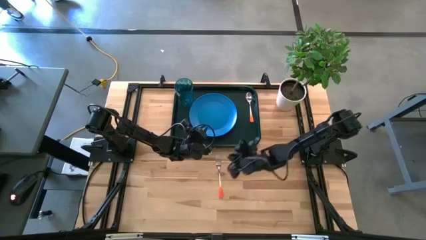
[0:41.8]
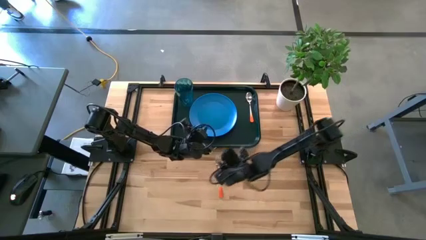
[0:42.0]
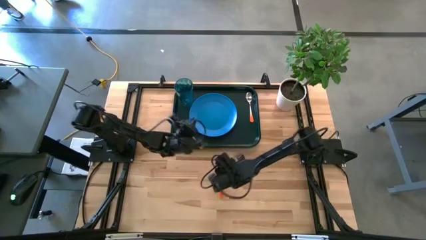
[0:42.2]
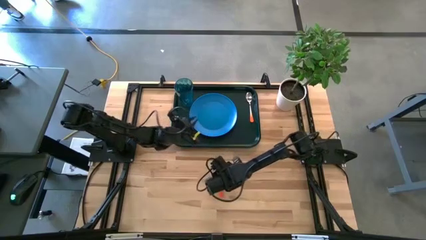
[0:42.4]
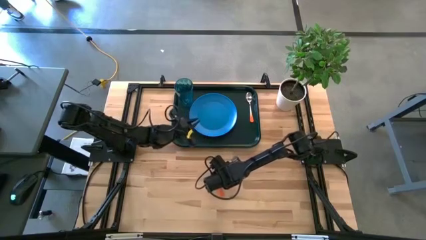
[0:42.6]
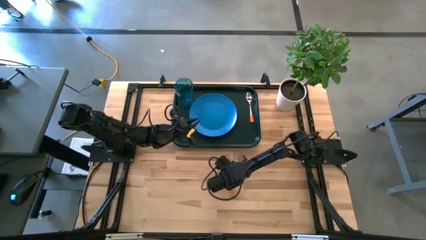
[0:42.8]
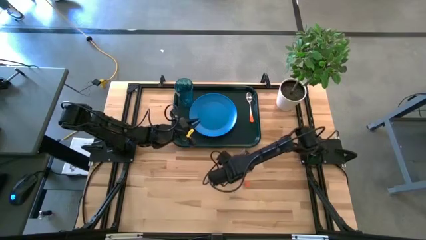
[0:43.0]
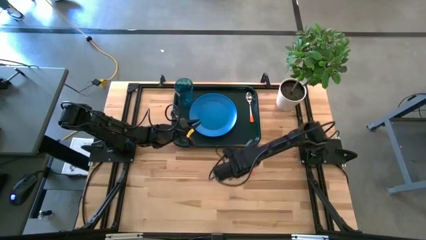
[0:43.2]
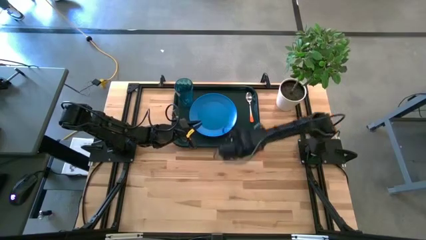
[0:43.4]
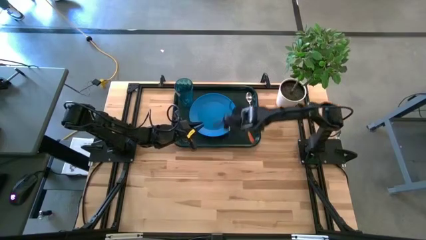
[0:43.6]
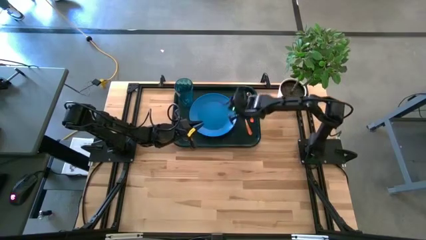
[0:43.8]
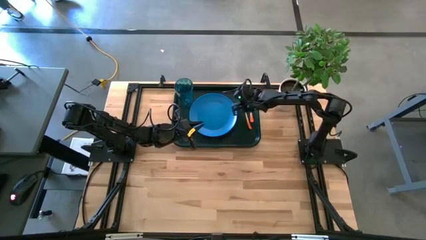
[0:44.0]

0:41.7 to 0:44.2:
Task: Pick and place plate/cup/fork/spoon on tray
Put the orange fork on the green tray

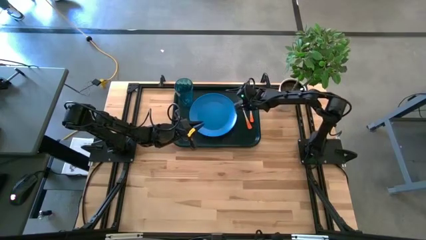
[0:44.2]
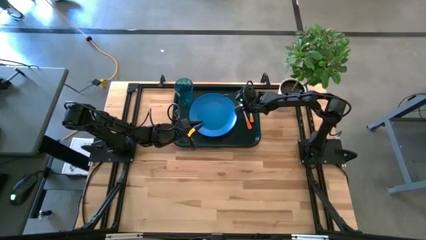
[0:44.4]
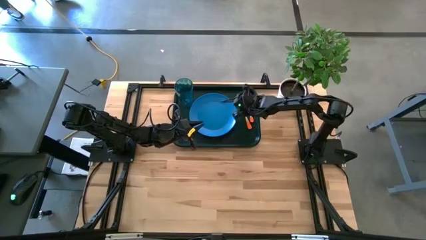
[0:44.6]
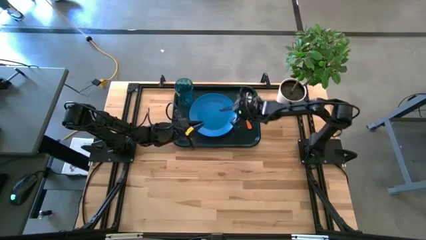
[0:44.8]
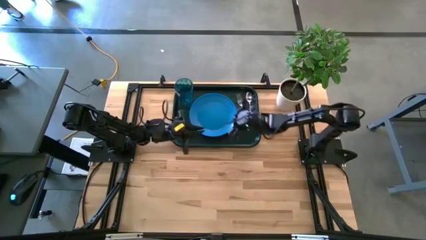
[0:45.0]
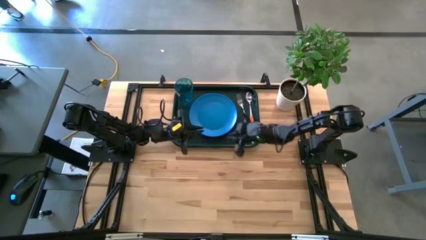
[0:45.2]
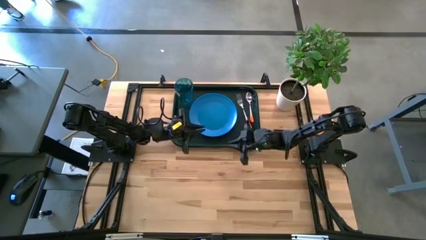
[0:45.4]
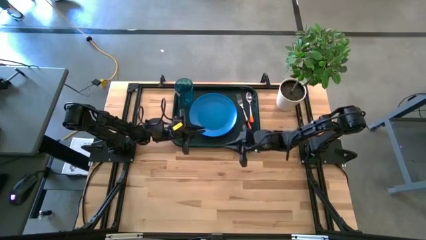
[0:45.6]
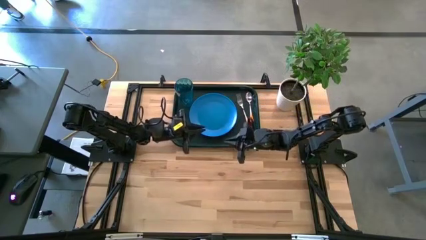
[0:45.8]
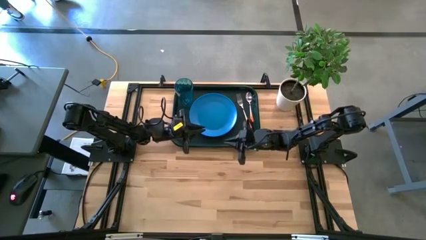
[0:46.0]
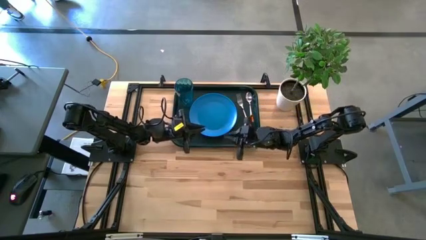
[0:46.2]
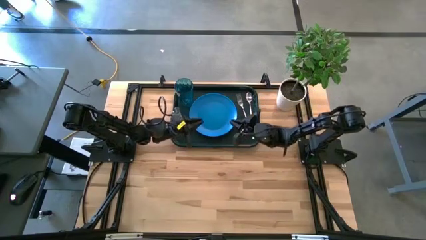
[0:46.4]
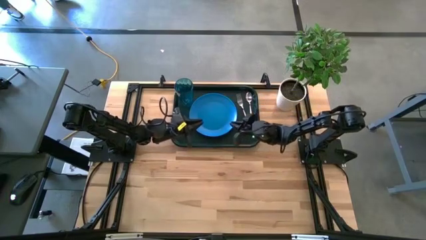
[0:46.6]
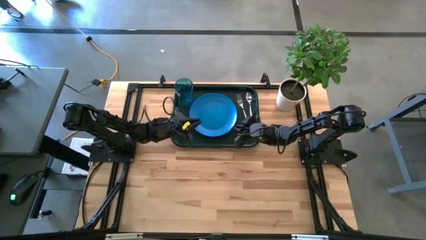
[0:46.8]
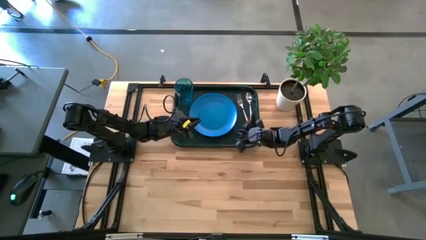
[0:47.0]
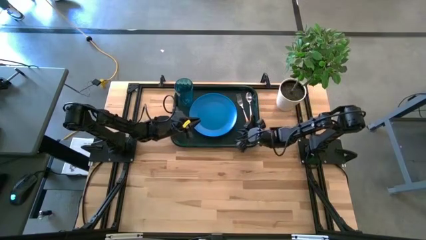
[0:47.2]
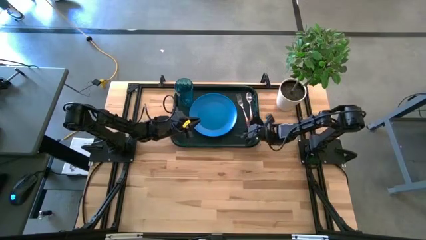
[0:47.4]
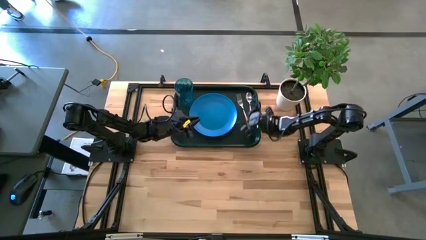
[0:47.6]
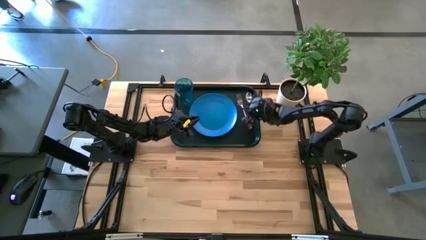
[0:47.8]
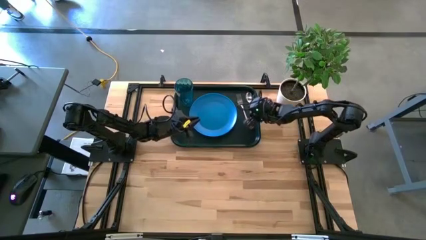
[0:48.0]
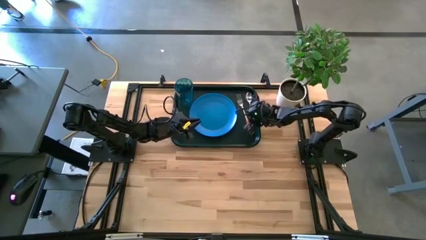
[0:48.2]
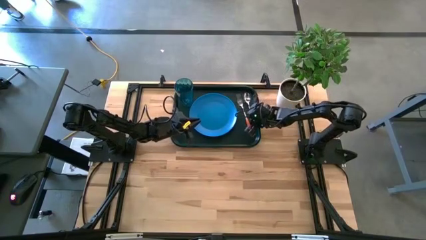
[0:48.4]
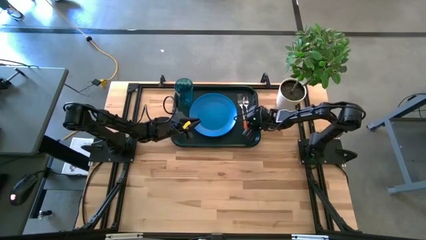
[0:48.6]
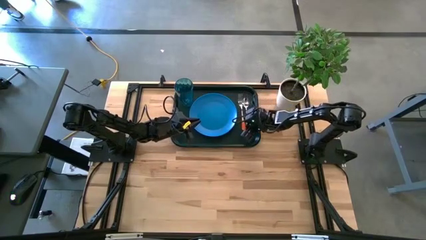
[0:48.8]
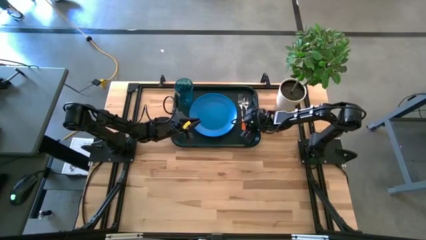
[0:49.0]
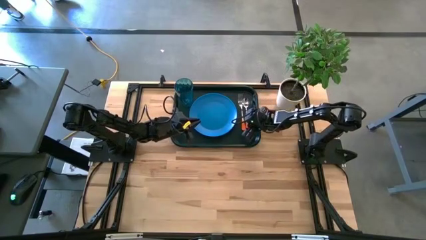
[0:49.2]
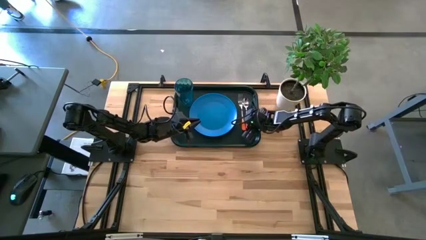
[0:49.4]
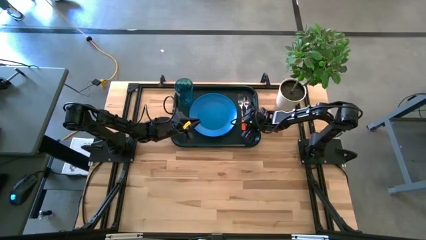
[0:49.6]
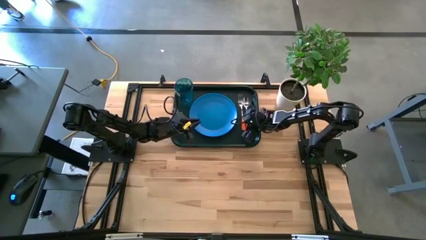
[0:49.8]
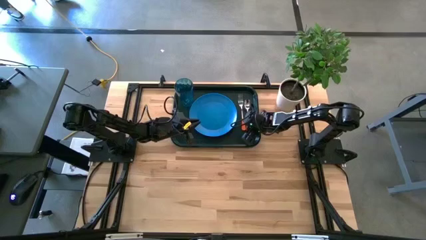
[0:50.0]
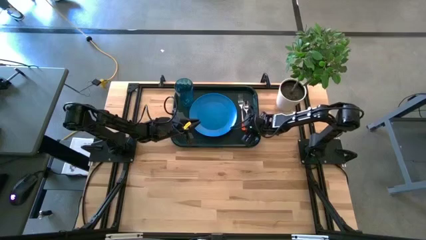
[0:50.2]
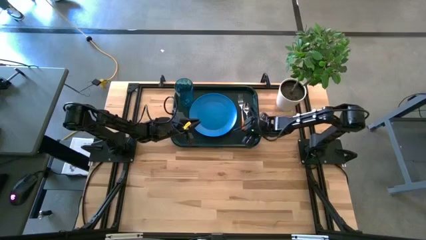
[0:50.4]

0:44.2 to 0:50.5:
Adjust the orange spoon

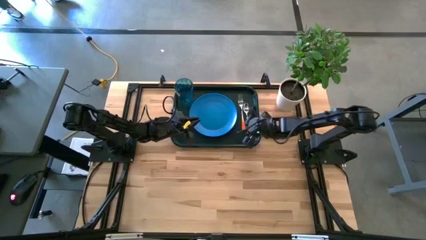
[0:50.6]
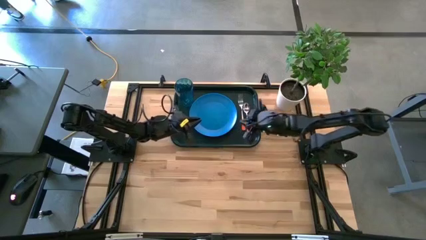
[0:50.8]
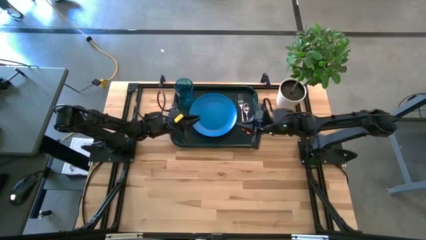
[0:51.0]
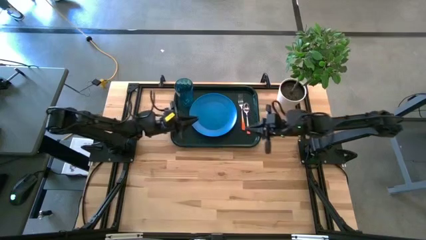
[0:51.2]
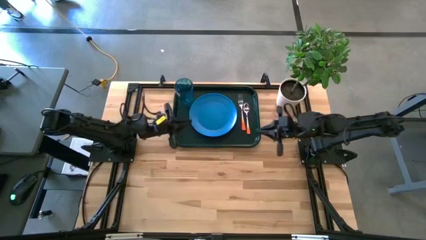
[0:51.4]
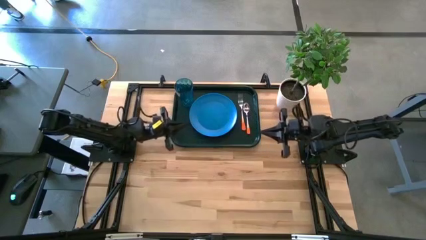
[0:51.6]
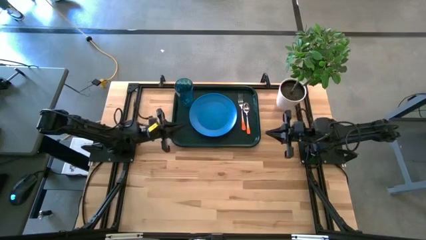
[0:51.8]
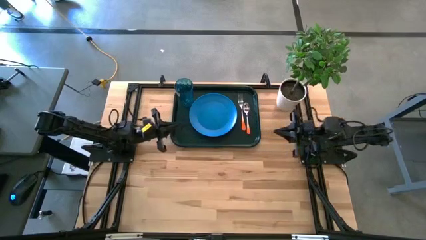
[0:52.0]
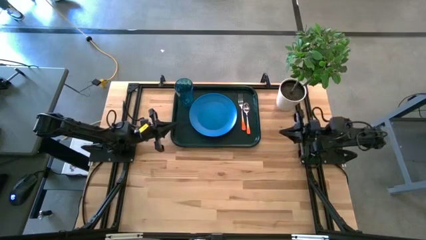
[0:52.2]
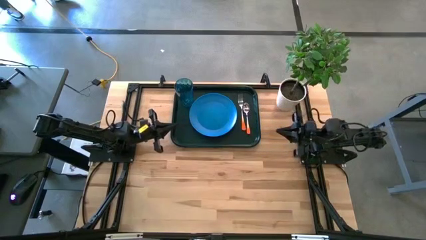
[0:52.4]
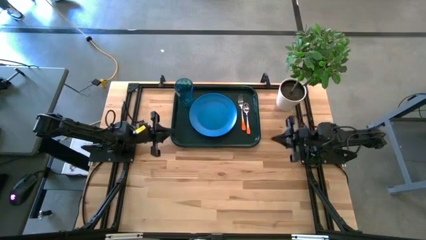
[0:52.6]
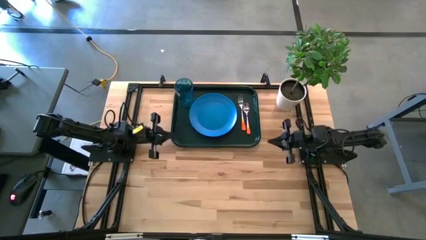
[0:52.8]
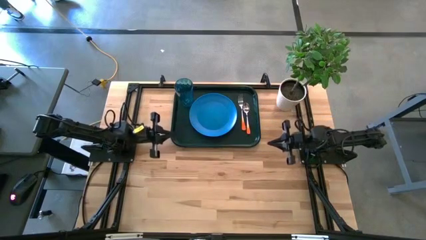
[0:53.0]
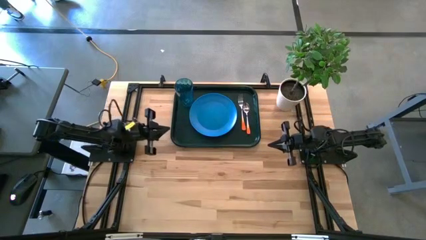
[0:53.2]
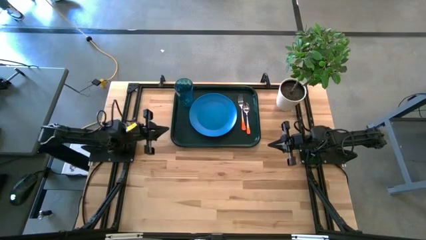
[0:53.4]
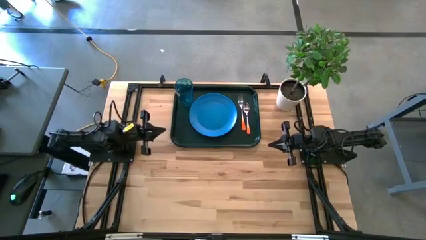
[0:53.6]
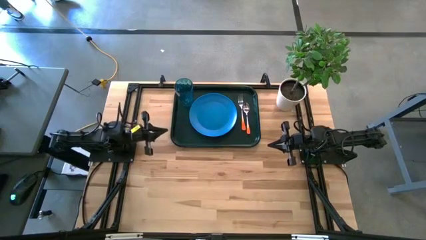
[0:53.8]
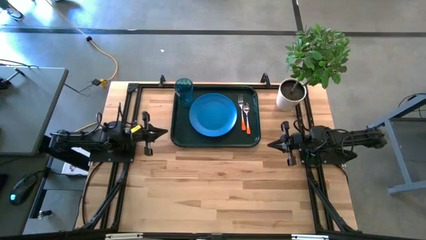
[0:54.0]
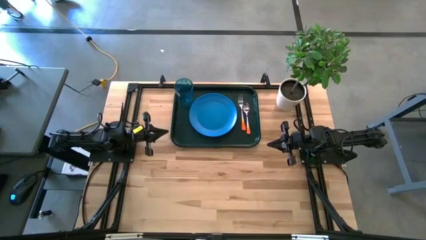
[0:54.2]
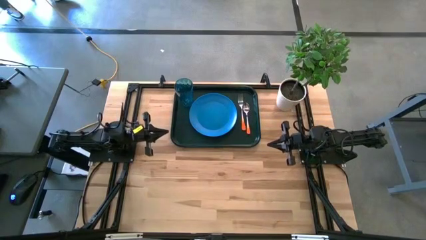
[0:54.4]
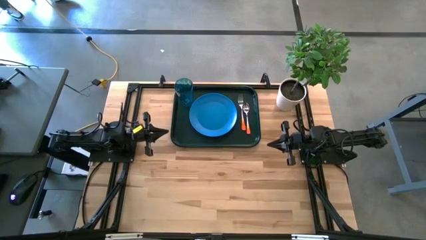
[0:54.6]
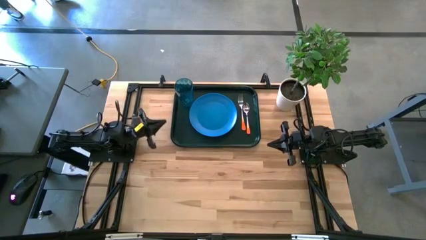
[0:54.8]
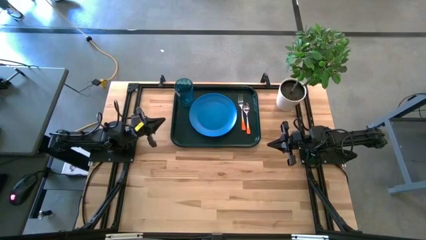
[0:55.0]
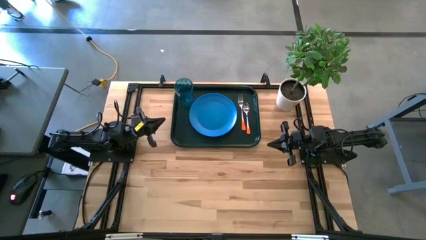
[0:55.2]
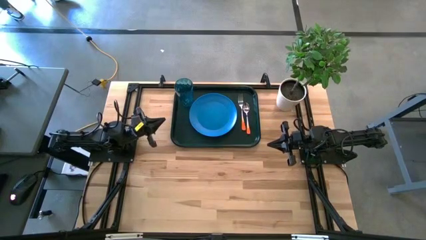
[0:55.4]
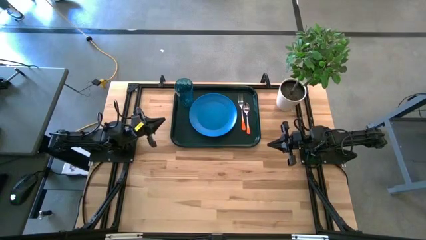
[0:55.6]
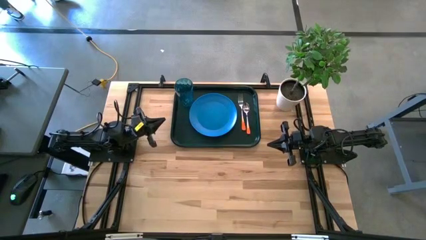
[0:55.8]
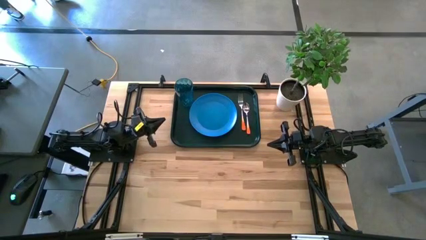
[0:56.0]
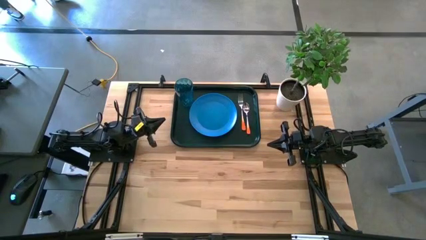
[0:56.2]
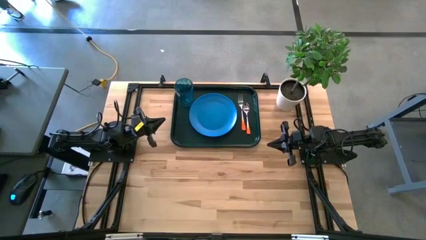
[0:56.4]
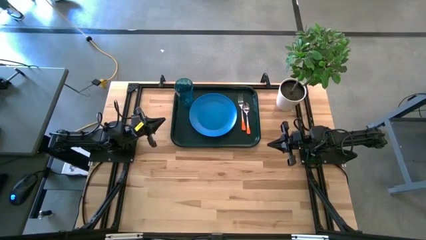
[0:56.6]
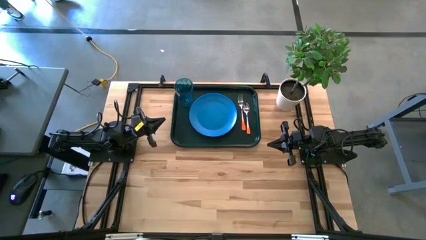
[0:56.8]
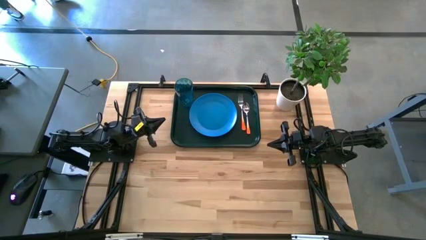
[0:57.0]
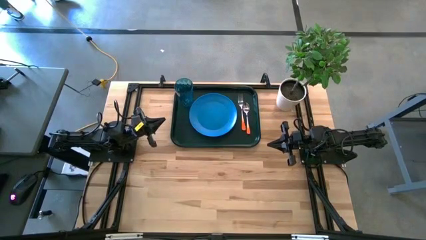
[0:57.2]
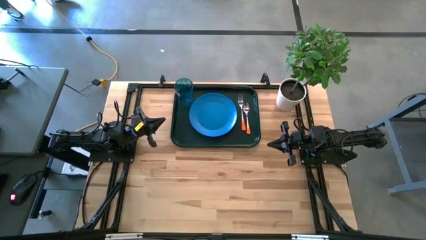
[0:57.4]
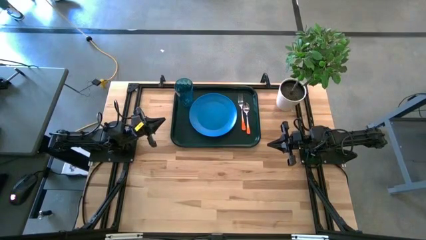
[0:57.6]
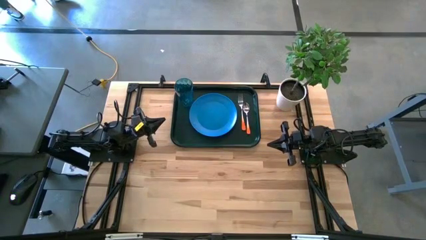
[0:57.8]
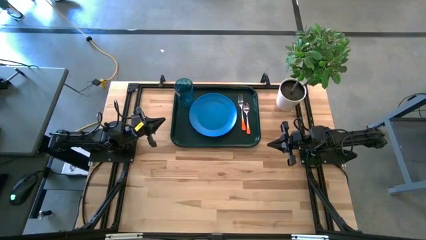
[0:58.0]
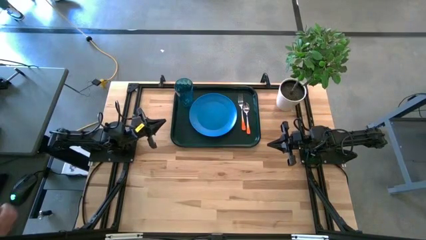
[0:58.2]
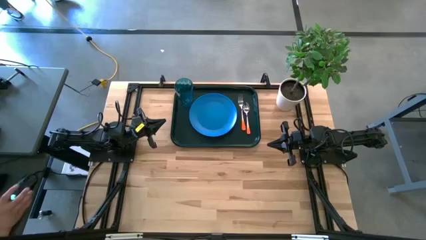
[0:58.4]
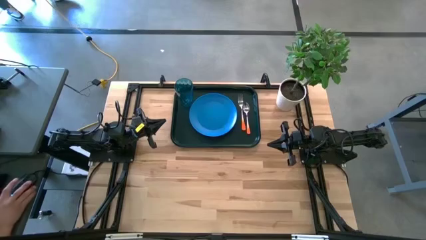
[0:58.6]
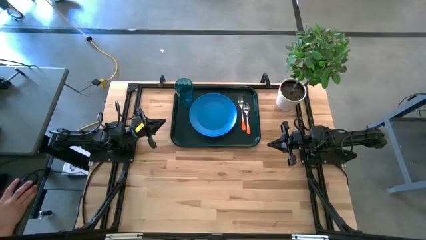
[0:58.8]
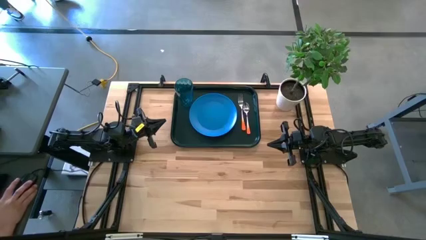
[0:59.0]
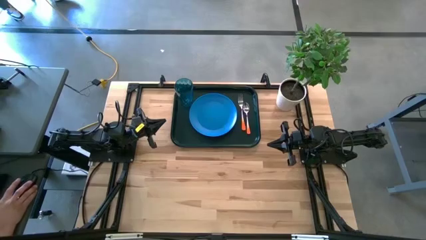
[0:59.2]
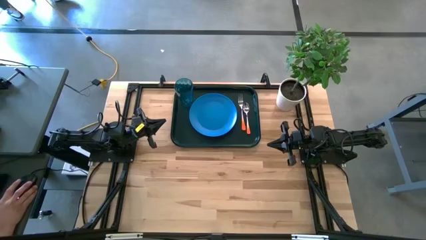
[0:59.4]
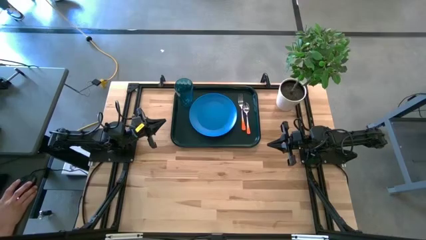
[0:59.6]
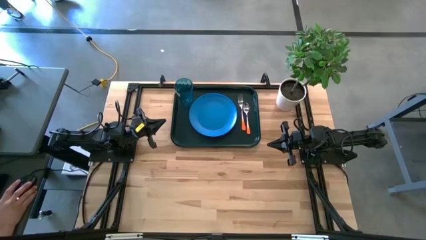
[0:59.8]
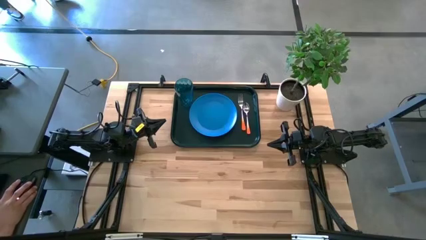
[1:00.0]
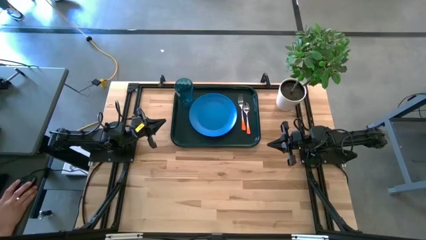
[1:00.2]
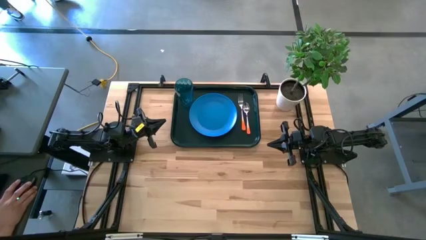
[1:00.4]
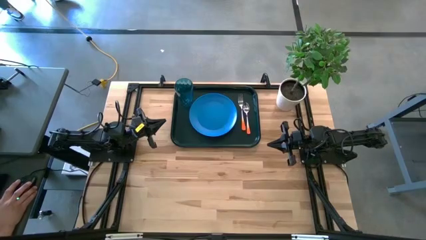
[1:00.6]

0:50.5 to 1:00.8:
Return to Home Position
